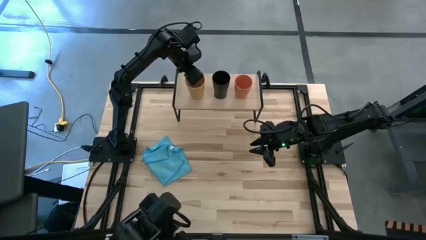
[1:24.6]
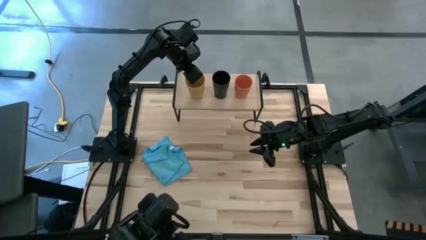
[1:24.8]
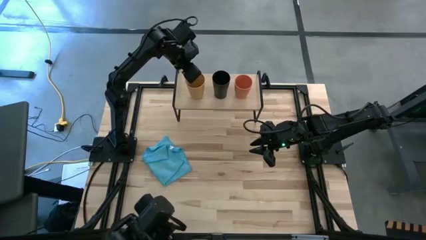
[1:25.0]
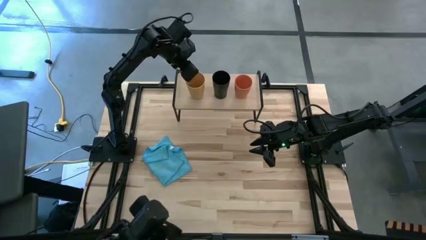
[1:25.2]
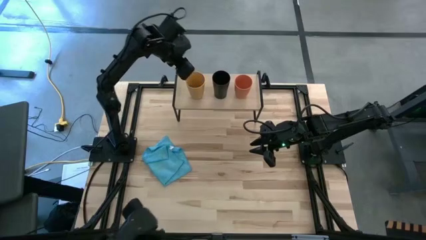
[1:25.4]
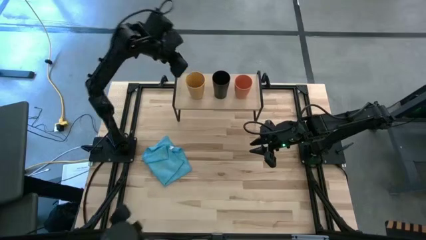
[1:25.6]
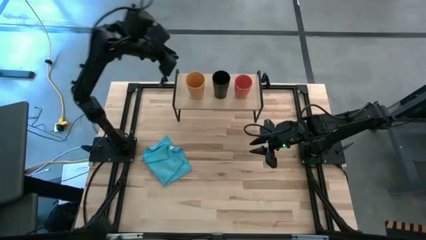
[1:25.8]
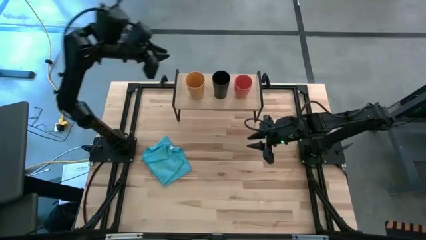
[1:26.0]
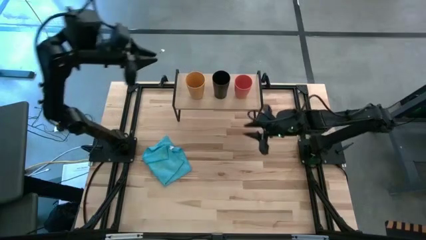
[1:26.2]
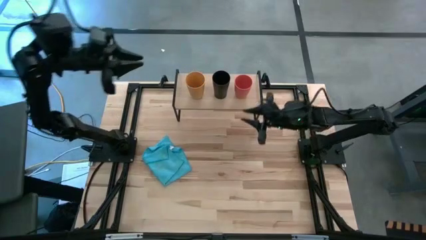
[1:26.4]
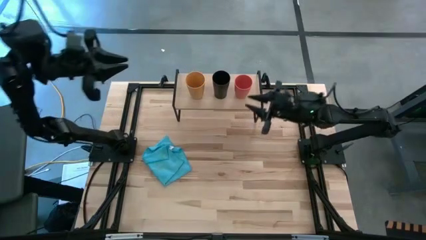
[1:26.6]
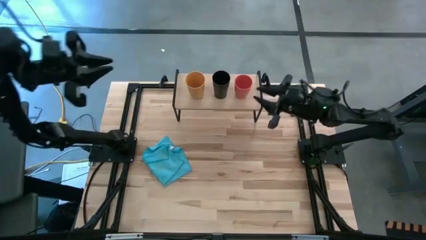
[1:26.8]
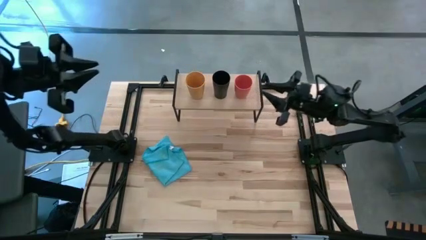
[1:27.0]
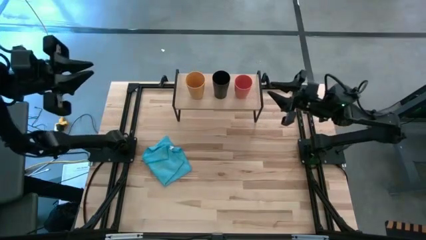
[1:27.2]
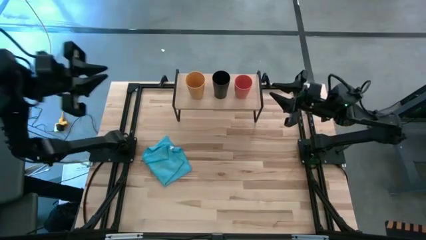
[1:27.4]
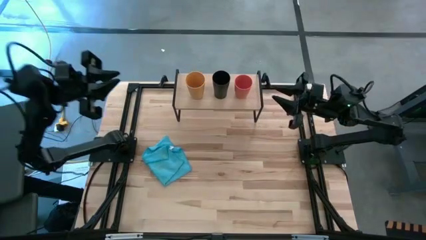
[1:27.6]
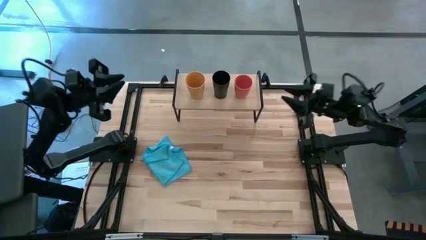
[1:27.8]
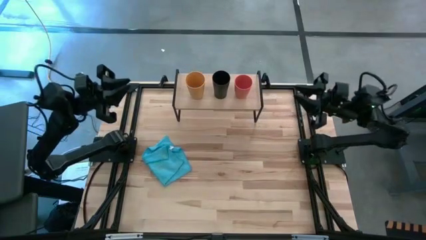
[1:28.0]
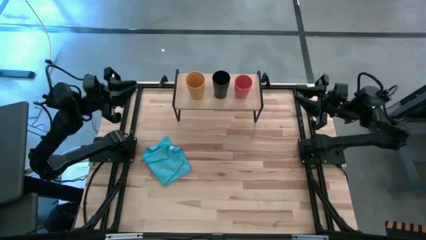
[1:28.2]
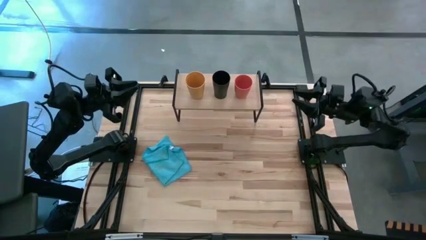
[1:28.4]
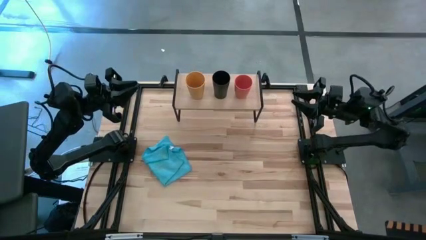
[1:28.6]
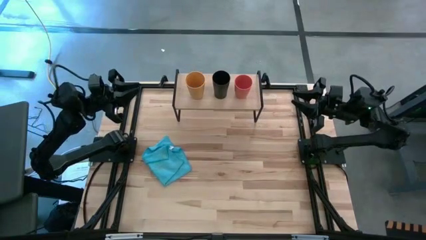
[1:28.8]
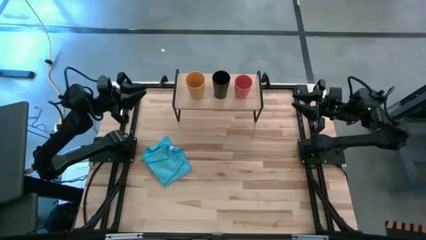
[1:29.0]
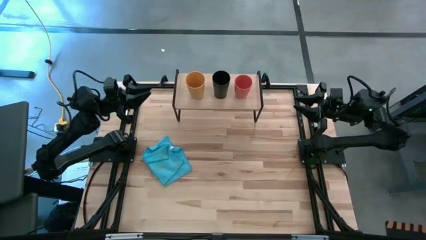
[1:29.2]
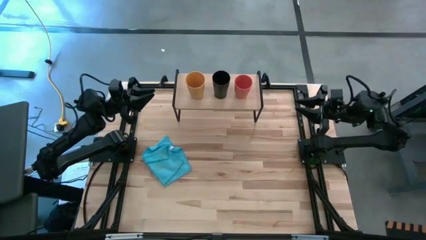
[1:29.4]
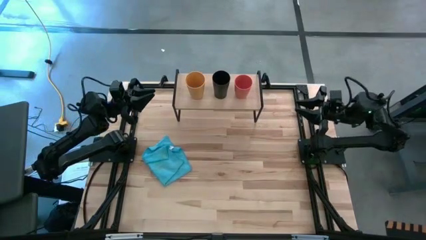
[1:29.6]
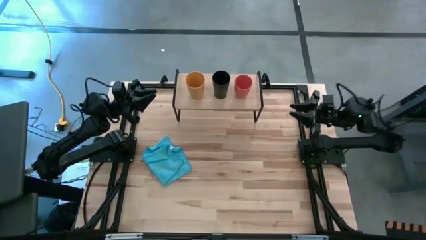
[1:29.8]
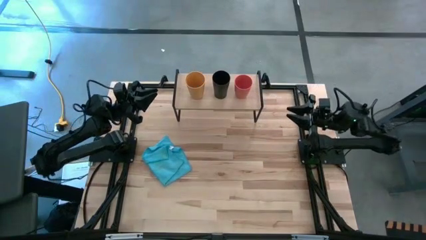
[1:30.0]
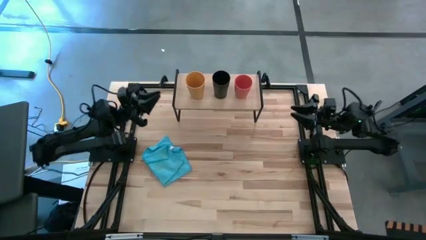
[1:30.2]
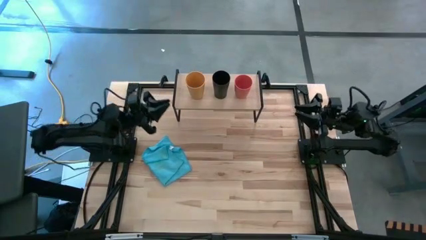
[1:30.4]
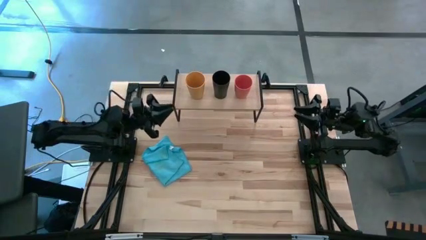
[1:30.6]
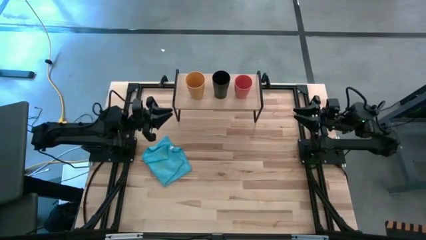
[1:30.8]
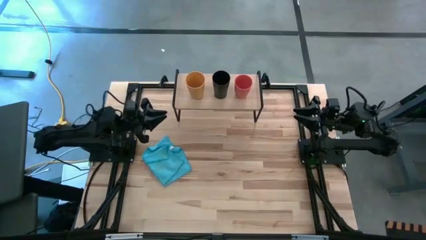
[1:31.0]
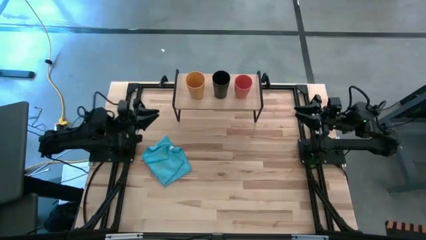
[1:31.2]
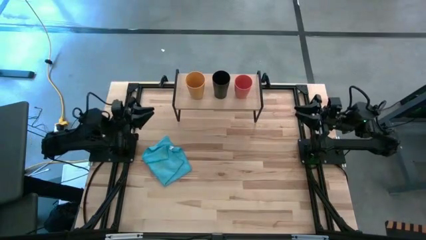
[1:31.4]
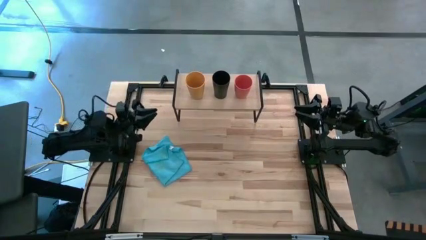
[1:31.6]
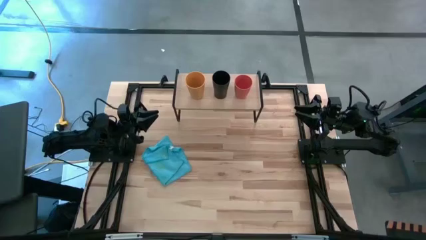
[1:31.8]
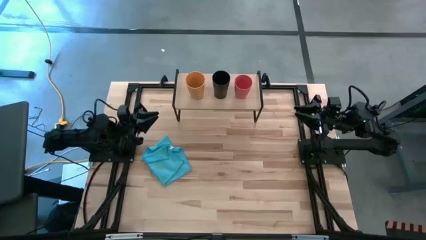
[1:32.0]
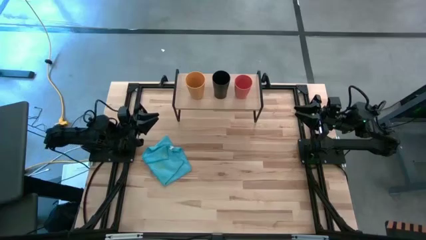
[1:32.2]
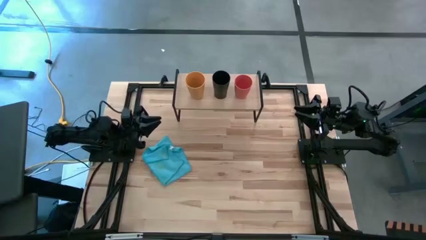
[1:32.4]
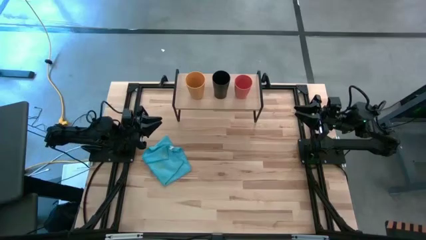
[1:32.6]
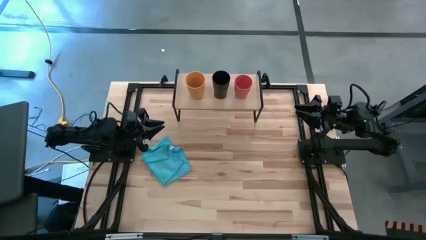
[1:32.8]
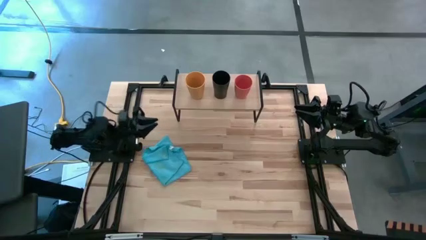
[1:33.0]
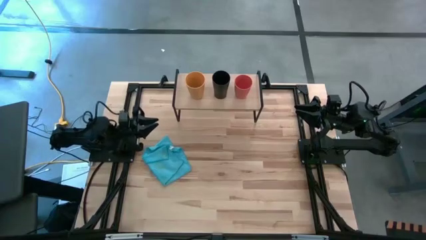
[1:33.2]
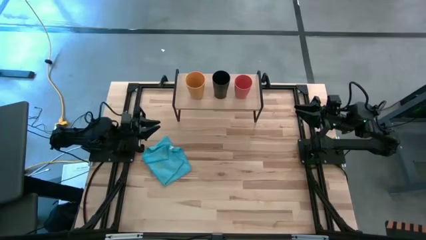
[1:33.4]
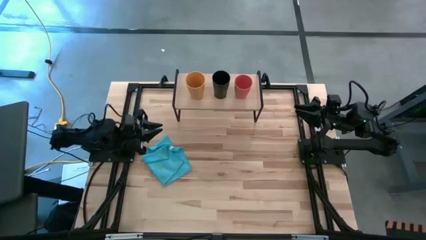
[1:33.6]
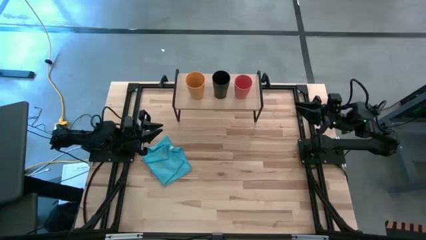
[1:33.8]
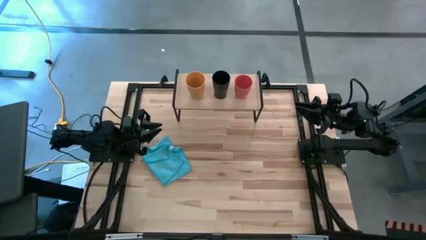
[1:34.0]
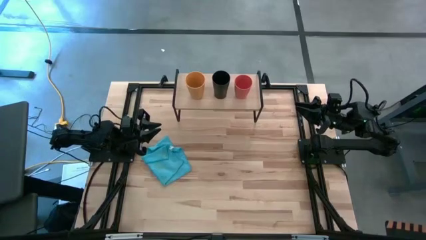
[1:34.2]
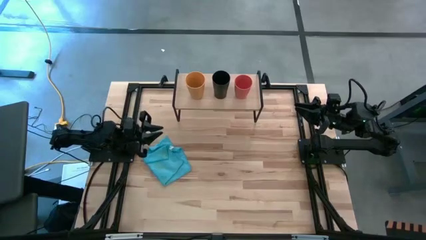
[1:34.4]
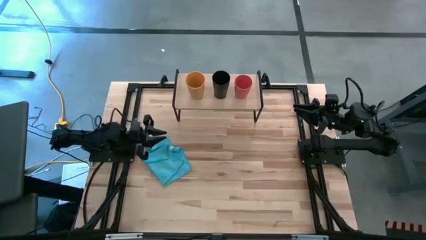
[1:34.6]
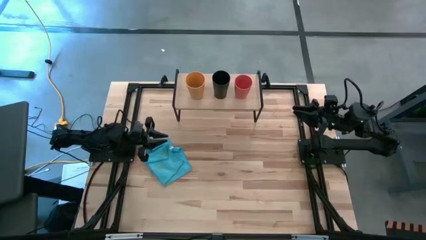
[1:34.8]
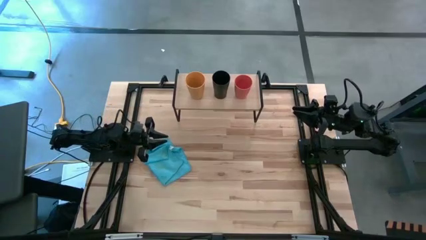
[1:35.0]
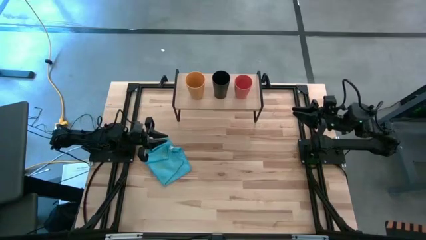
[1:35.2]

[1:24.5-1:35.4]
Task: Stack small to large cups/mugs on shelf
Return to Home Position

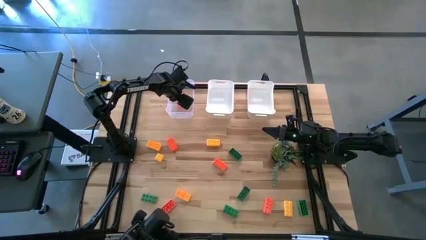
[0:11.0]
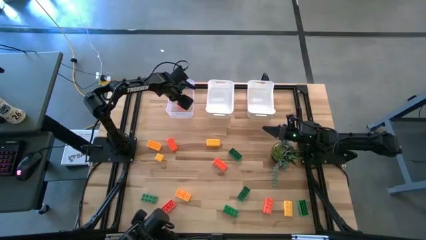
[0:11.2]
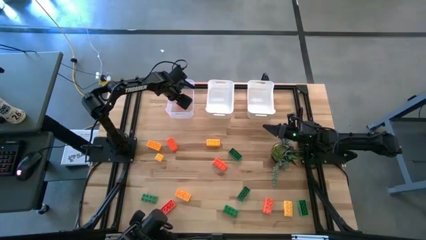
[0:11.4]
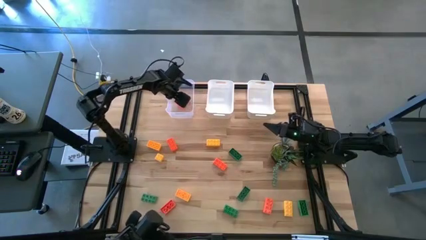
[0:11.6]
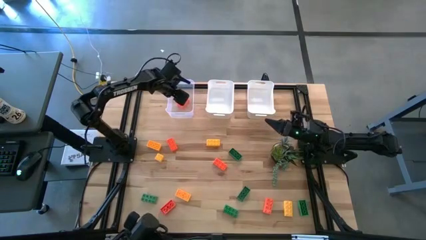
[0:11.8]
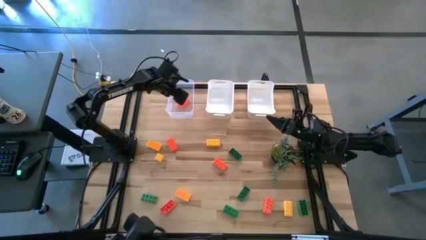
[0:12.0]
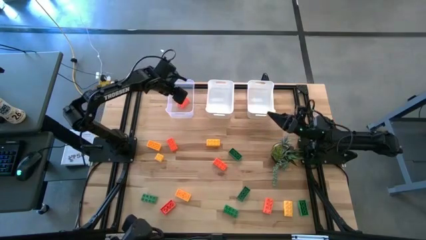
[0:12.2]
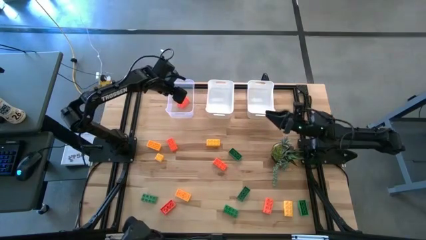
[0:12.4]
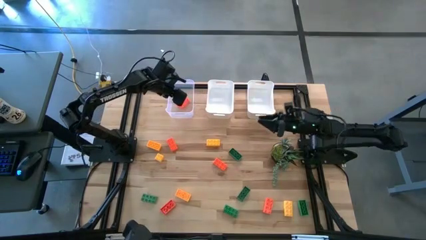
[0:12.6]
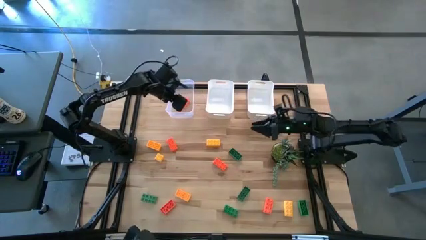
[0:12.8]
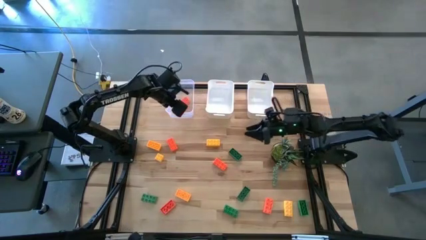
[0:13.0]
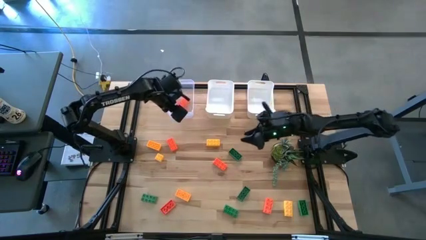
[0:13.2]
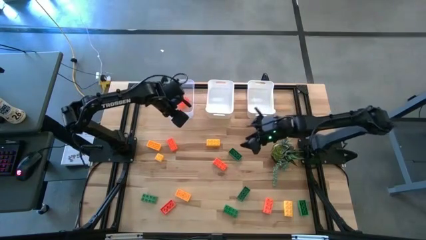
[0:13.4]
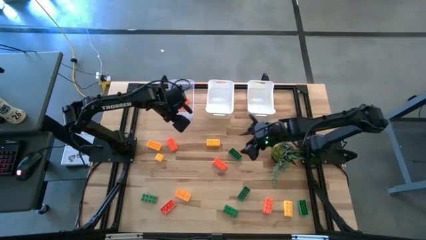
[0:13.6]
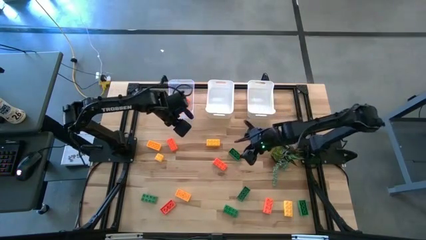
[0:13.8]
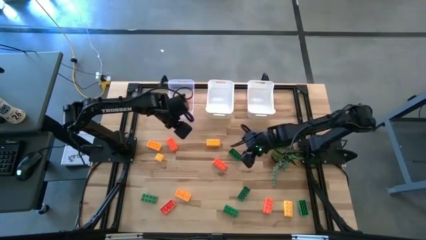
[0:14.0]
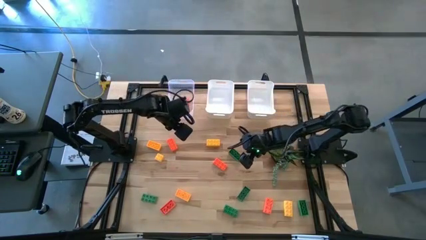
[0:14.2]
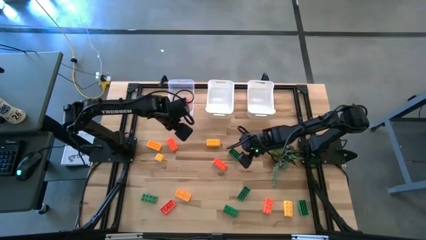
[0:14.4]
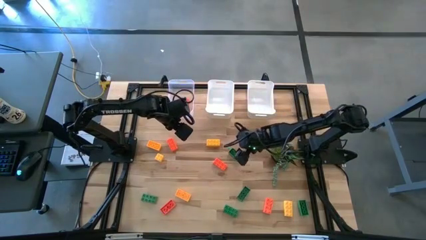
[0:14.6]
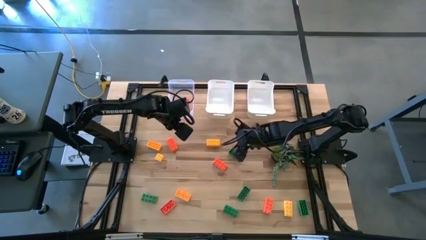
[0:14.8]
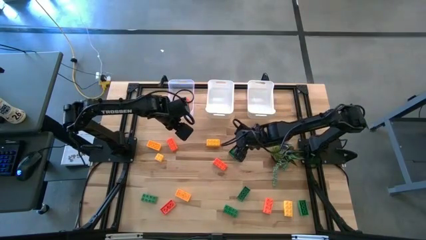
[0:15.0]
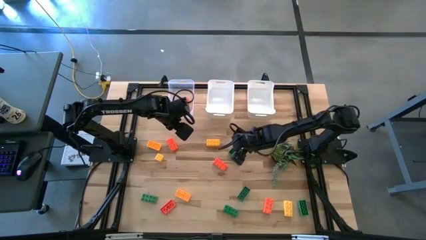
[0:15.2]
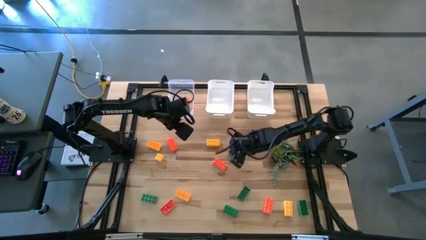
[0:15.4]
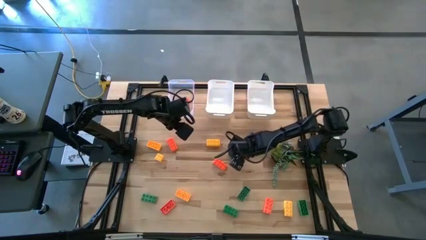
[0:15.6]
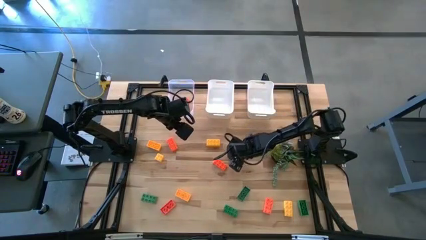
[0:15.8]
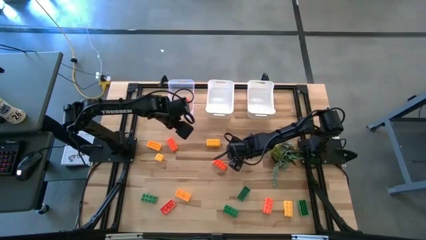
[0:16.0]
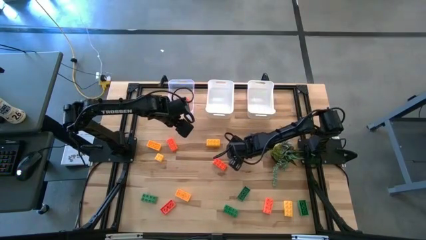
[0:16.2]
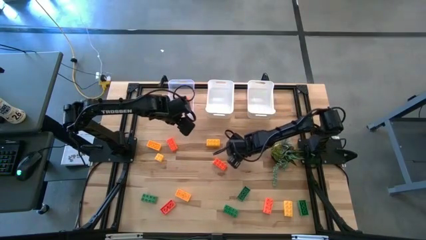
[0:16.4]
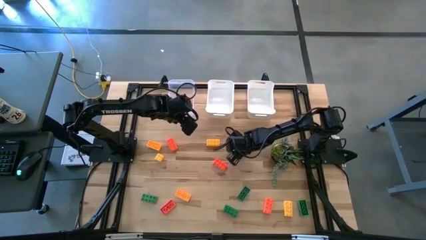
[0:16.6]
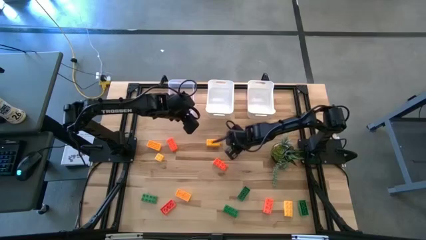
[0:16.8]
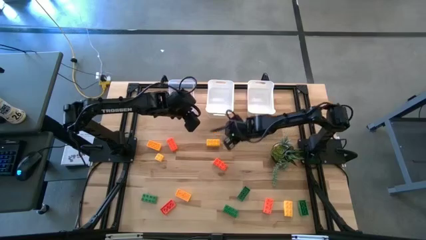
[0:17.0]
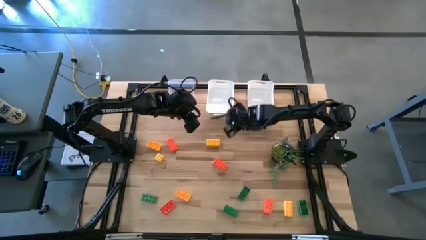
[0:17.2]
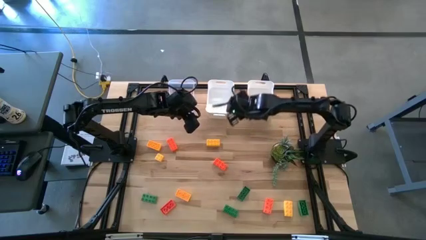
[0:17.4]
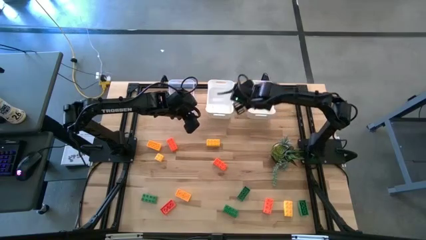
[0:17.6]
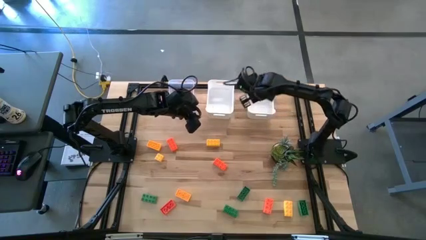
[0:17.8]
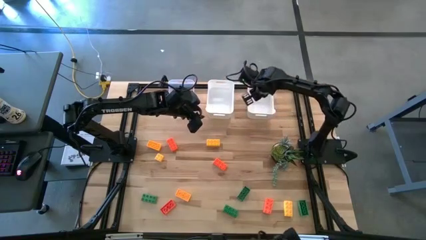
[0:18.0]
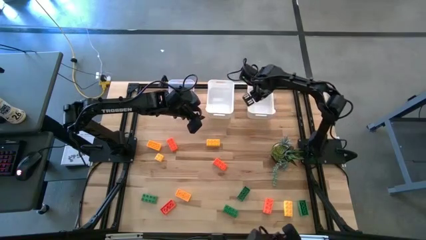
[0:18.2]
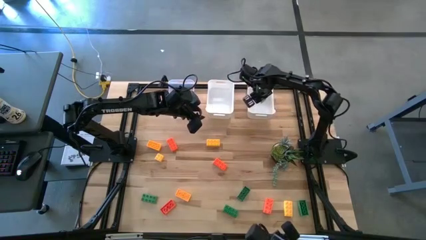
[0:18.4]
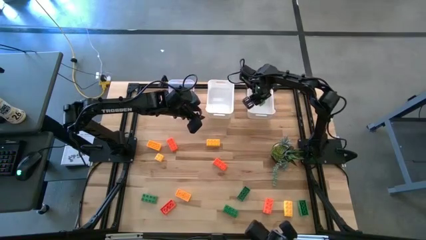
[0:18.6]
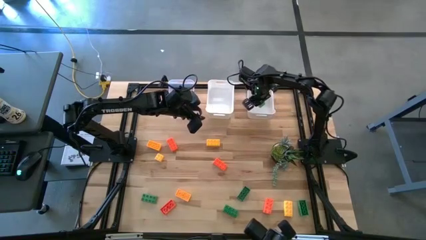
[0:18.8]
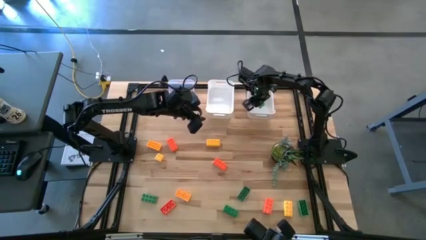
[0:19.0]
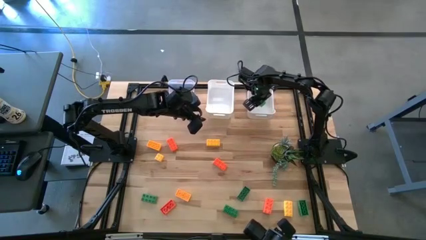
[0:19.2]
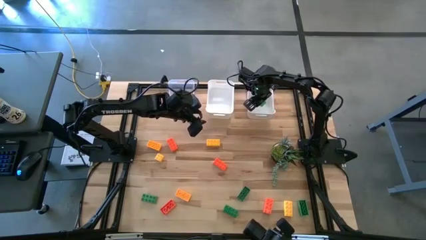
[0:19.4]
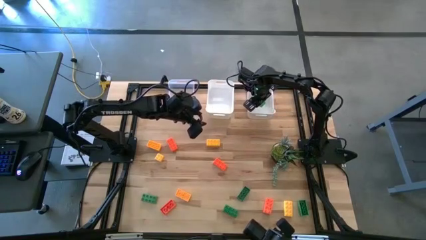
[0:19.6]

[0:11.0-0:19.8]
Task: Sort & place blocks by color
Put the green game piece into the right white bin
